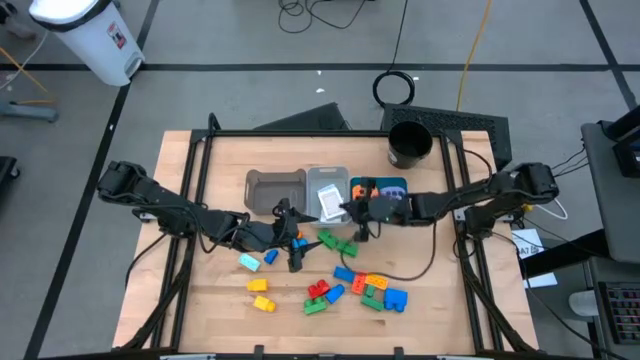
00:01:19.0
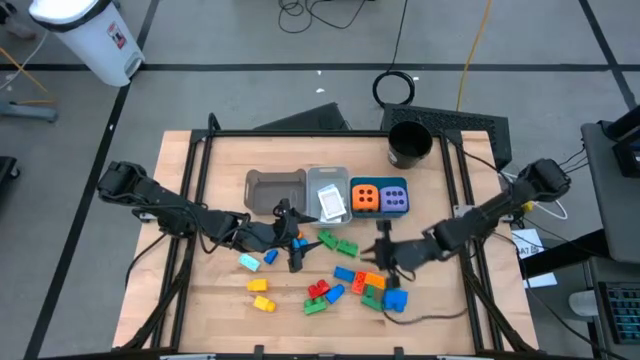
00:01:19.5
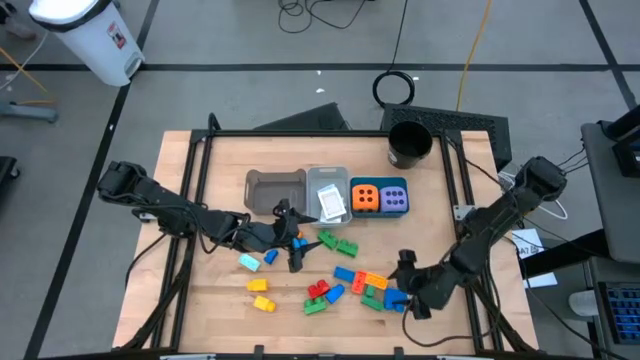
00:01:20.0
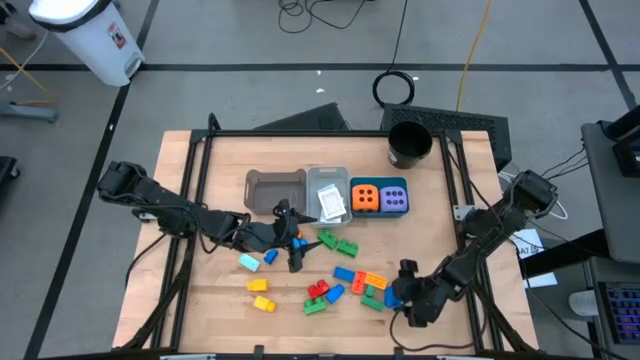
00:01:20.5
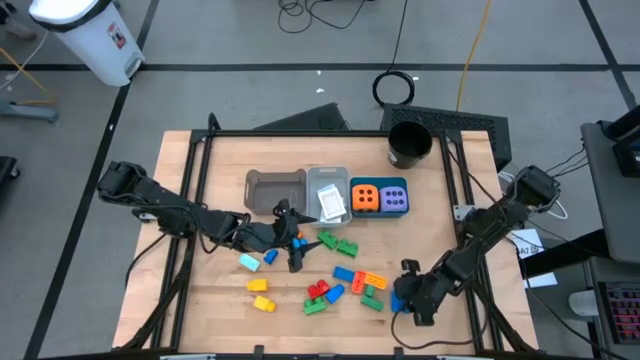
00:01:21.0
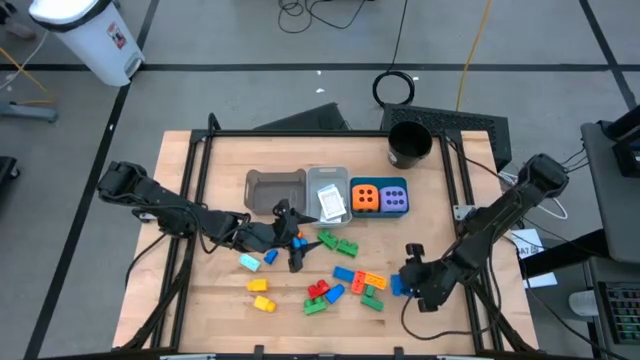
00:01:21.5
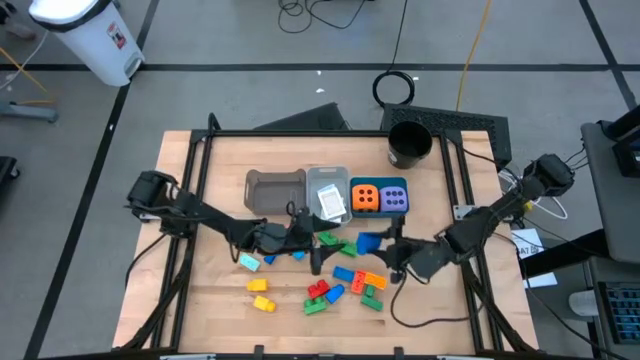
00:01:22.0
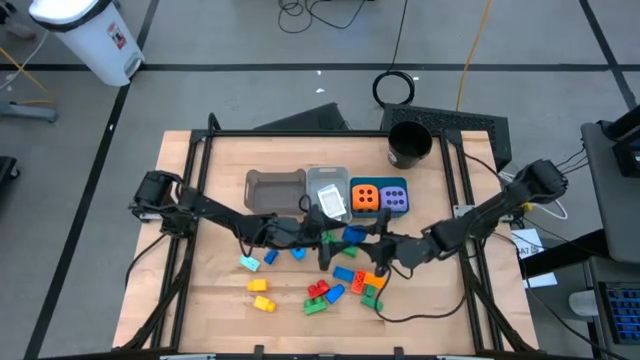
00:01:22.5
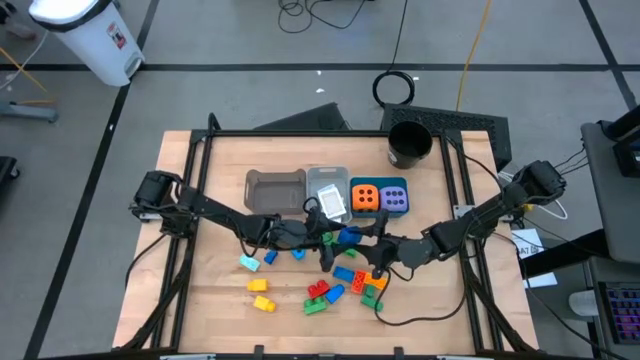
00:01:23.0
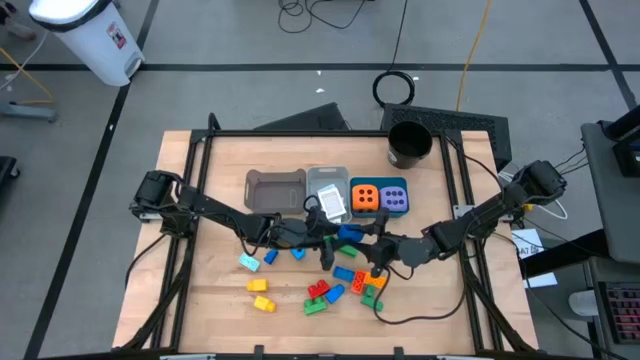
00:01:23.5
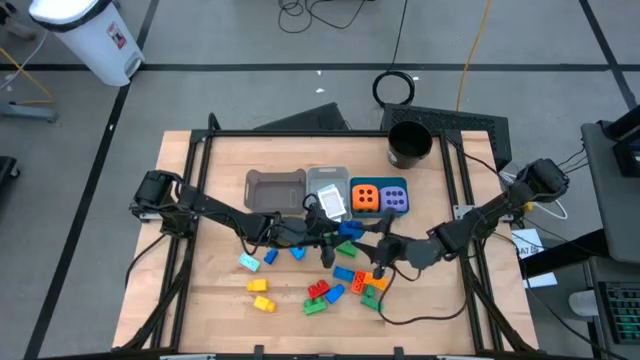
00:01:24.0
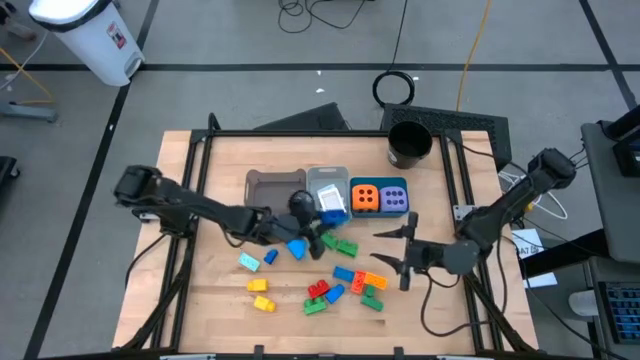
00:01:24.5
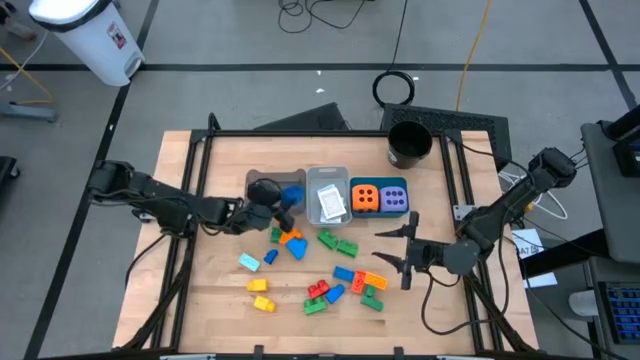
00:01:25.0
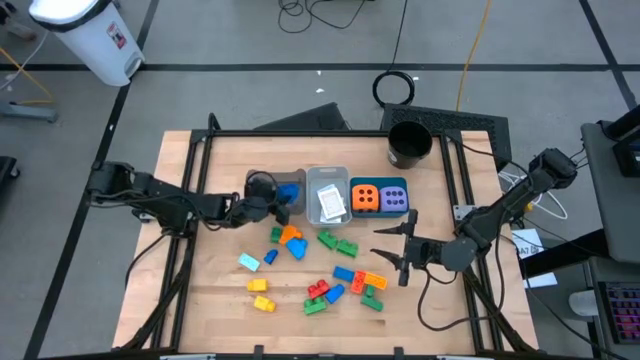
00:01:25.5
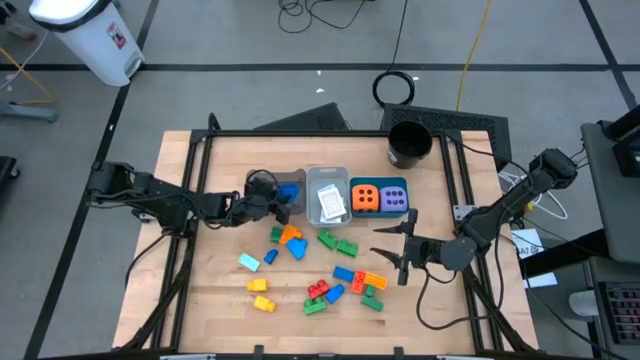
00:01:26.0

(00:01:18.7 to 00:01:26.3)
Task: Pick & Place Toys
Put the blue game piece into the black bin

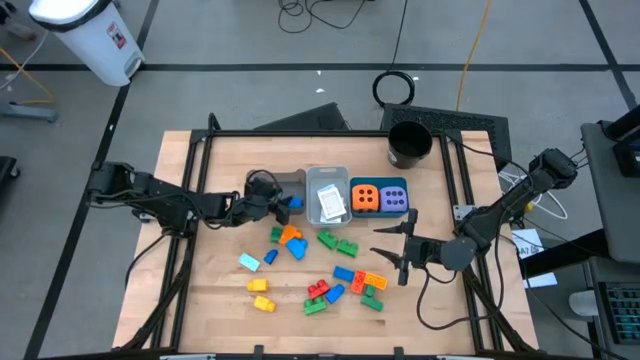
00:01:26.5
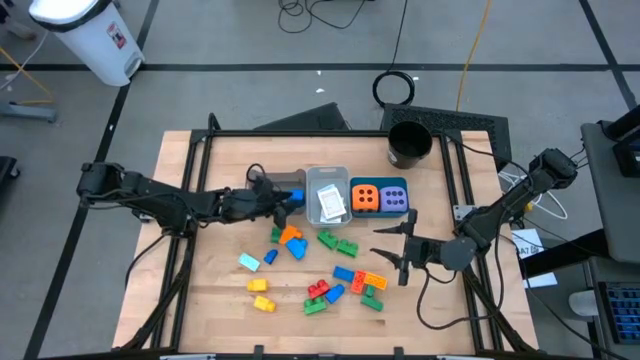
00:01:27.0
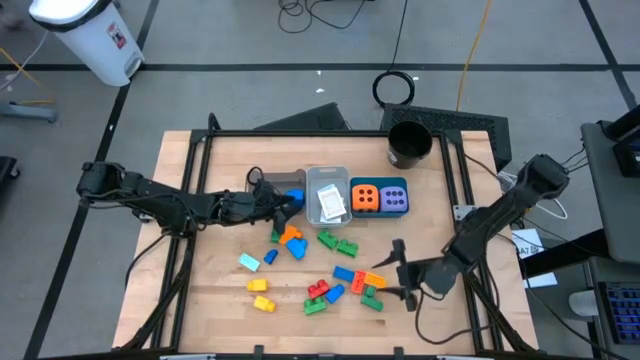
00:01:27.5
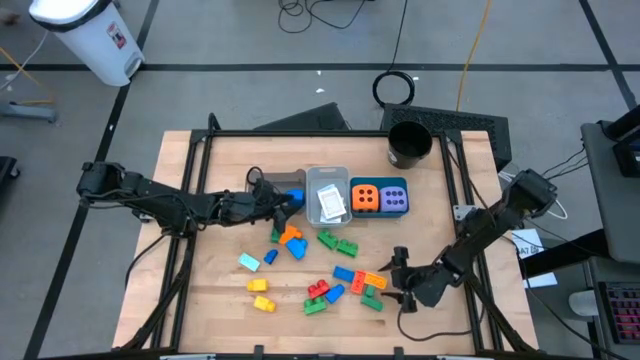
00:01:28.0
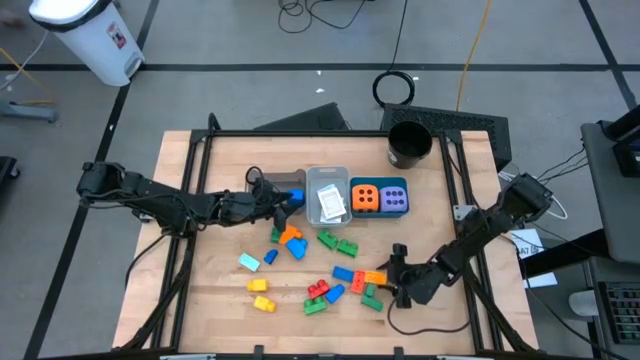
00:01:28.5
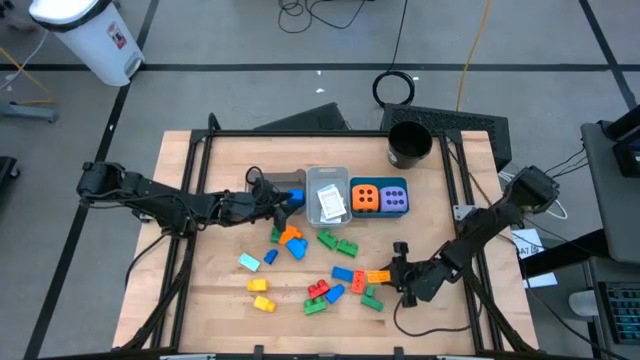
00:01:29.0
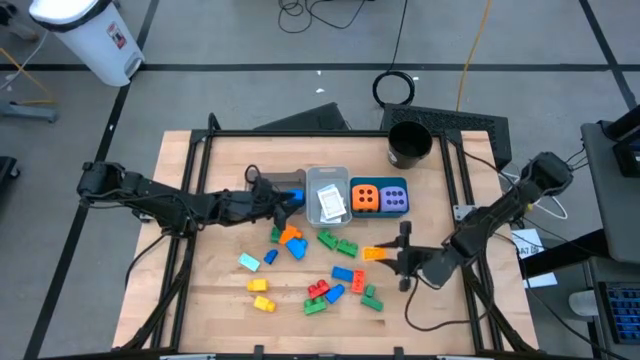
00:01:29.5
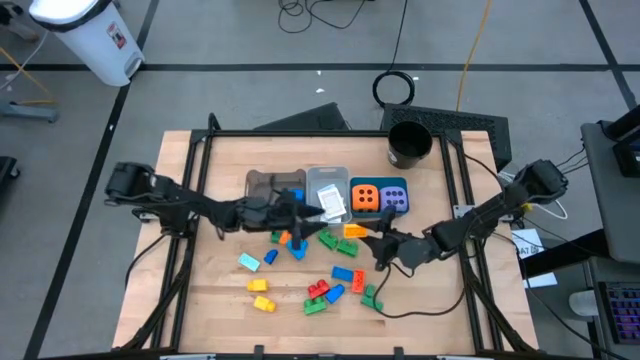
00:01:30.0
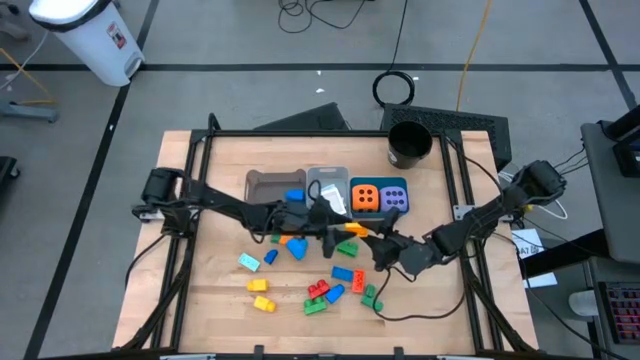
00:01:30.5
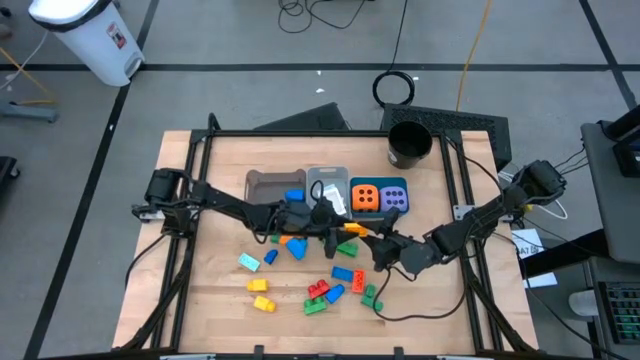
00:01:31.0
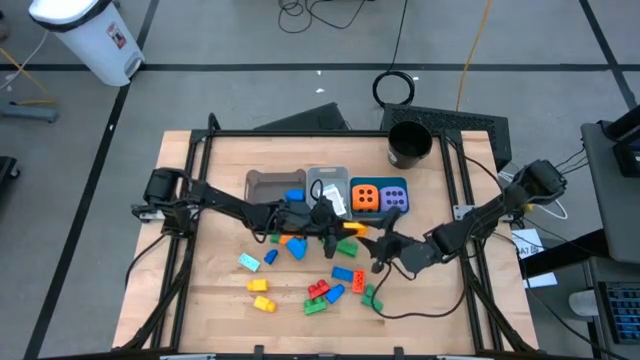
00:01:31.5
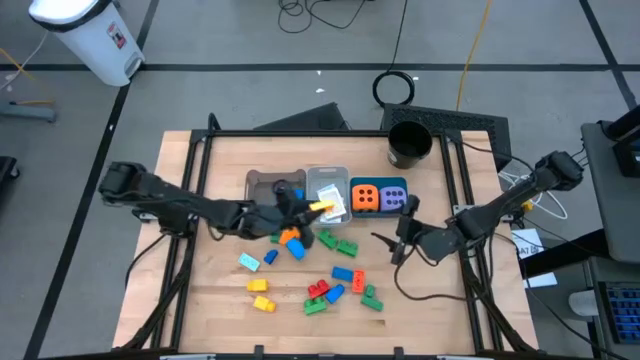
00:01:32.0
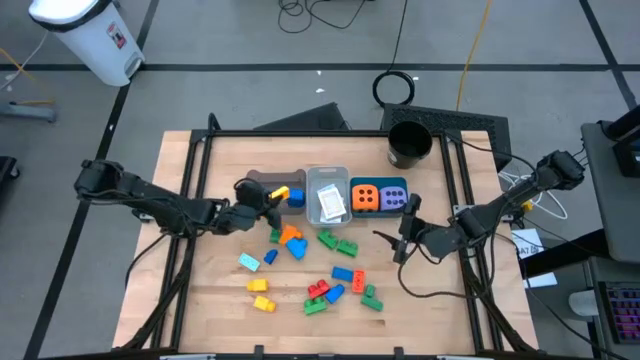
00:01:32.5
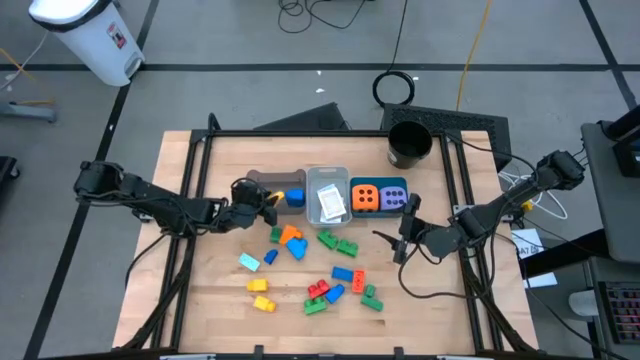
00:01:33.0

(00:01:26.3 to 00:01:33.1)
Put the yellow game piece into the black bin

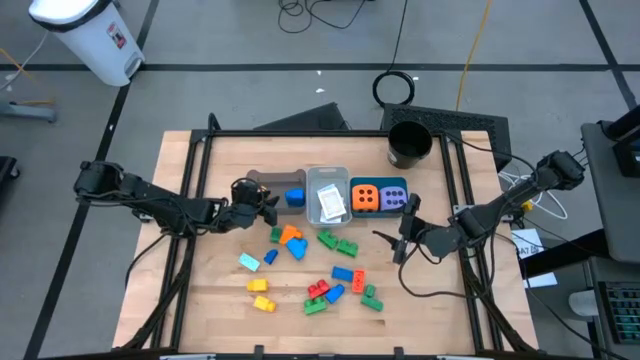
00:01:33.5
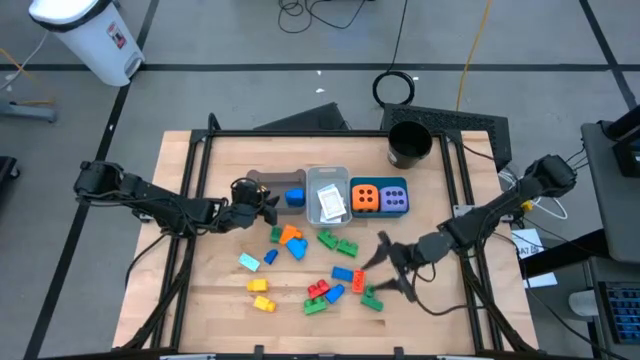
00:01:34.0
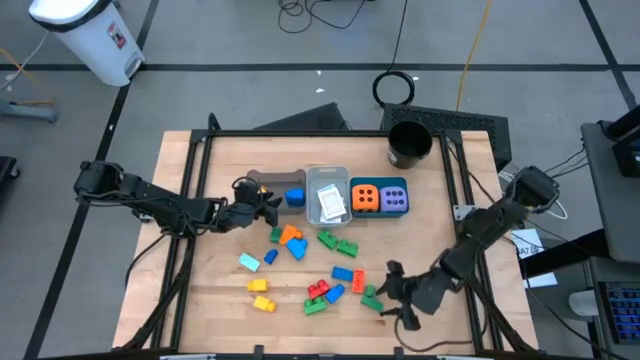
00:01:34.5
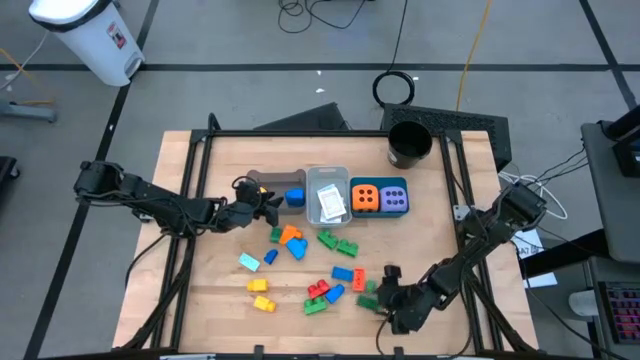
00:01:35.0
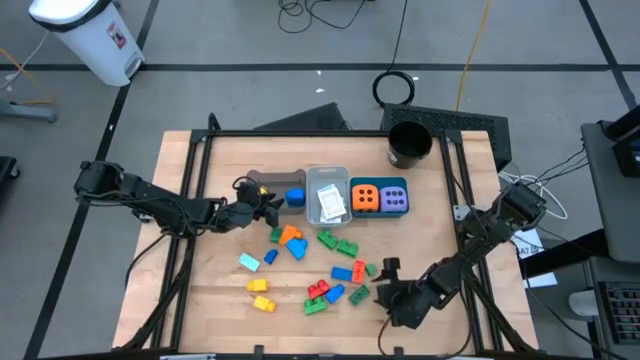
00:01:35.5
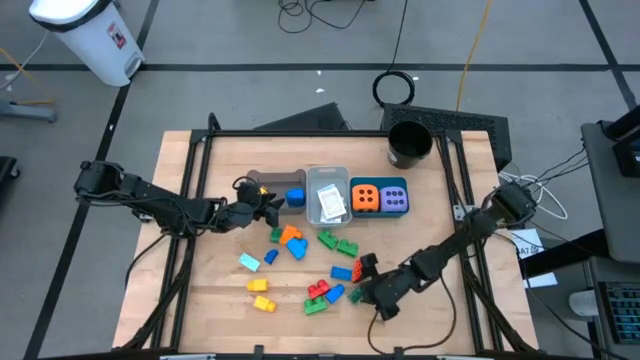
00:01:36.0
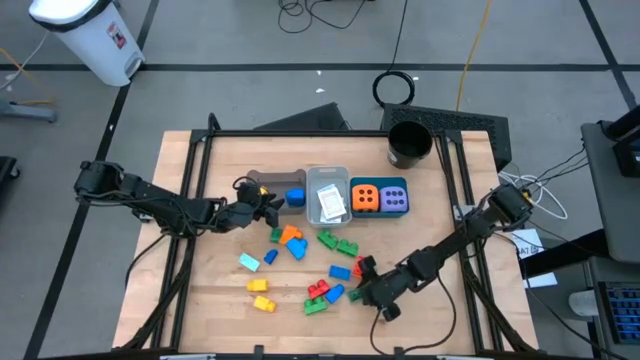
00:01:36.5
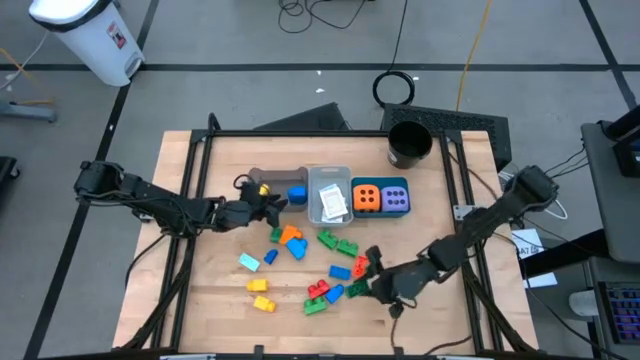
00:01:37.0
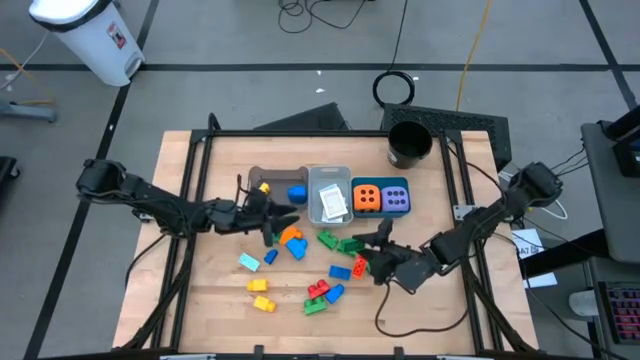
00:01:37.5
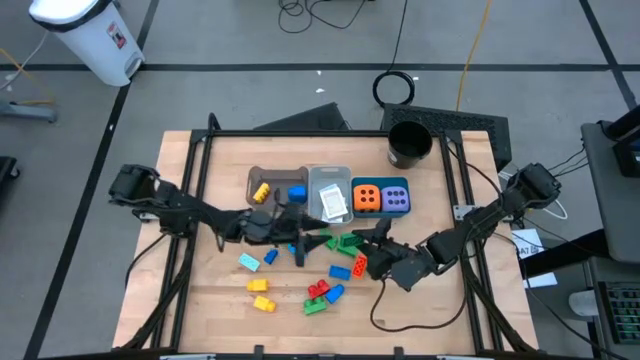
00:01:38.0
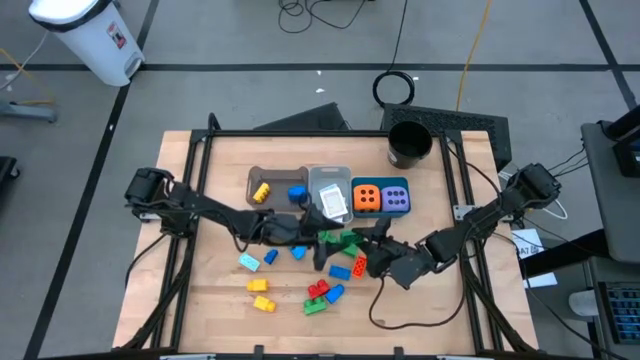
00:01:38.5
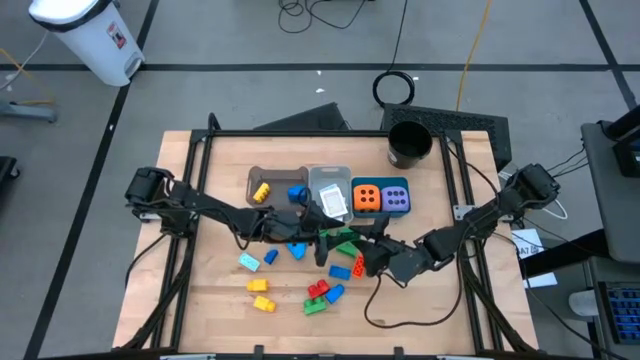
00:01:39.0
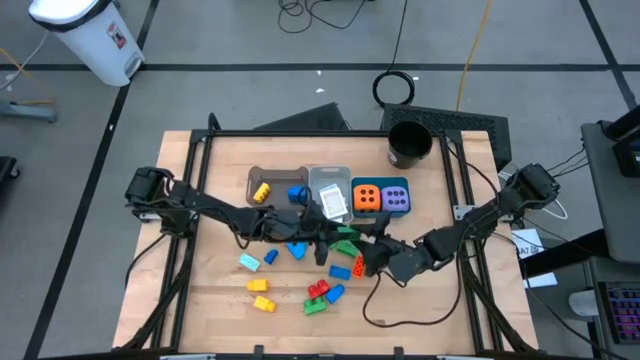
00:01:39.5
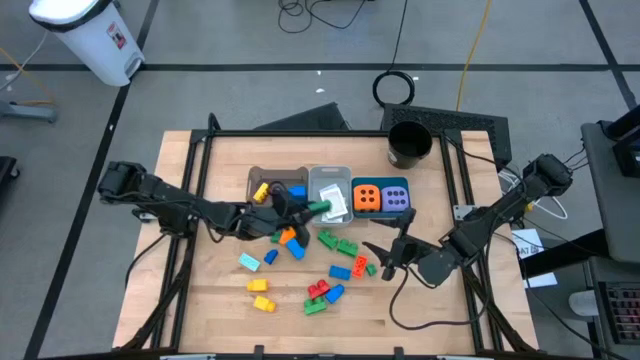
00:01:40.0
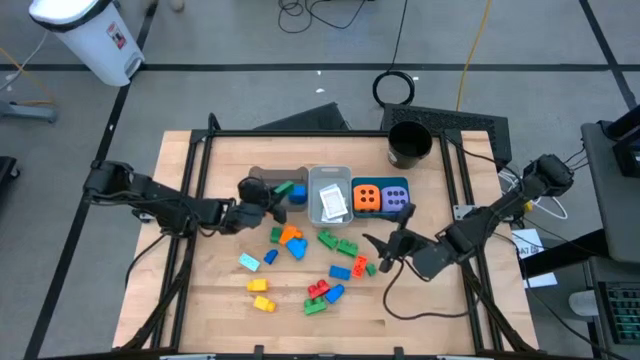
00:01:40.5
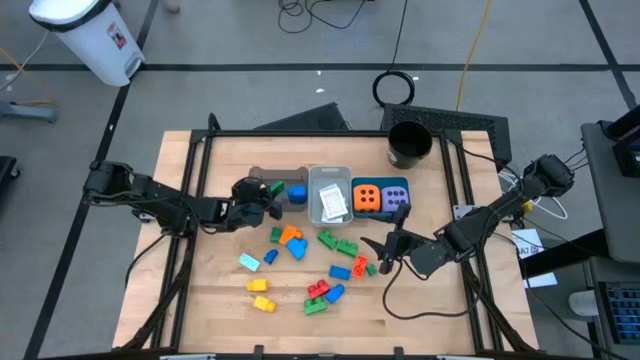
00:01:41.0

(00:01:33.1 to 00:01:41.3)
Put the green game piece into the black bin
